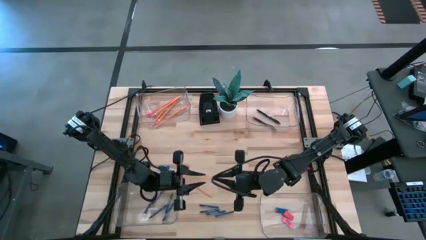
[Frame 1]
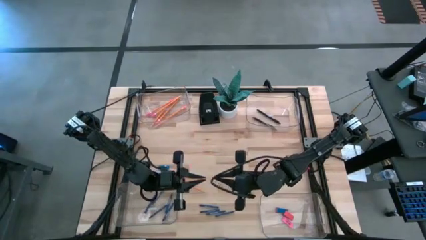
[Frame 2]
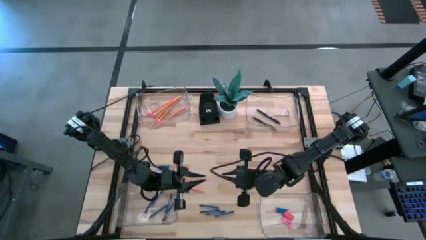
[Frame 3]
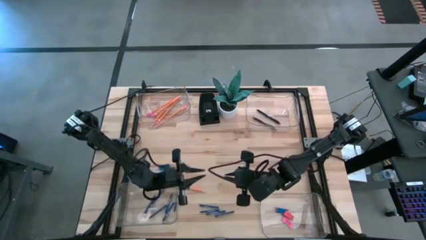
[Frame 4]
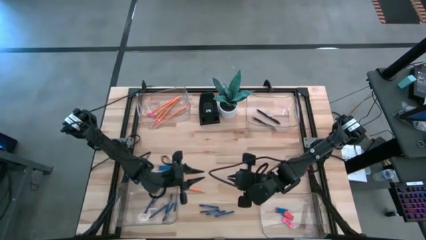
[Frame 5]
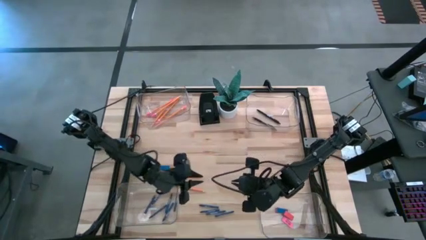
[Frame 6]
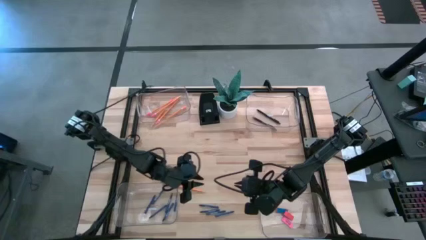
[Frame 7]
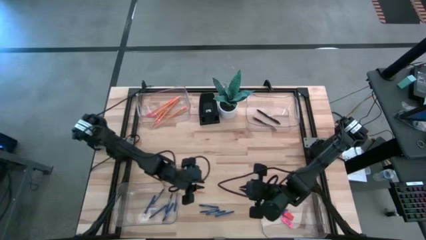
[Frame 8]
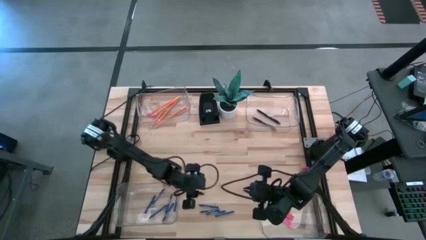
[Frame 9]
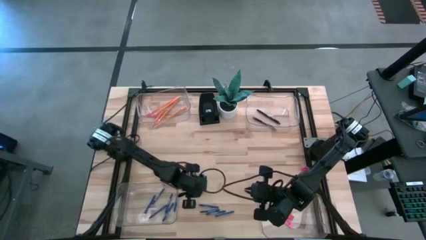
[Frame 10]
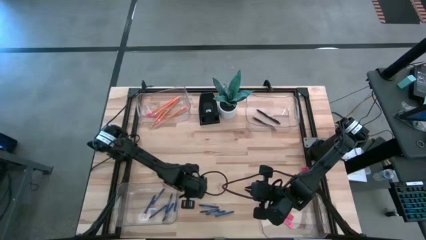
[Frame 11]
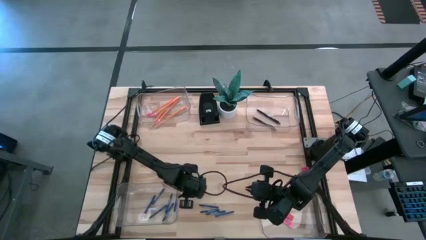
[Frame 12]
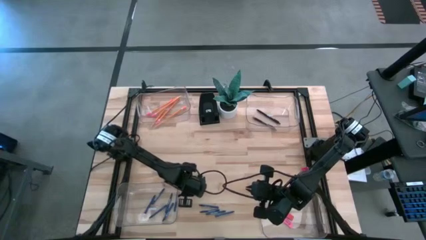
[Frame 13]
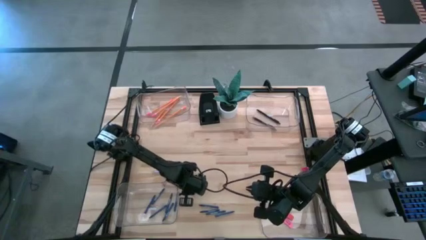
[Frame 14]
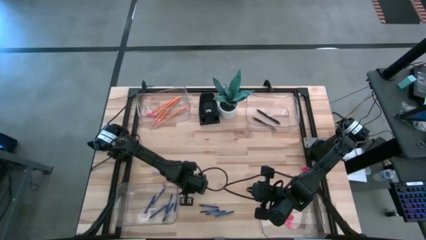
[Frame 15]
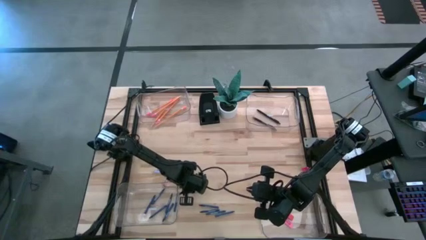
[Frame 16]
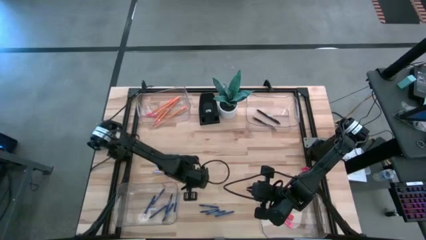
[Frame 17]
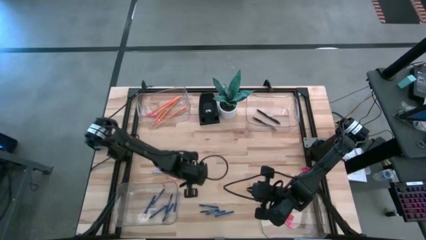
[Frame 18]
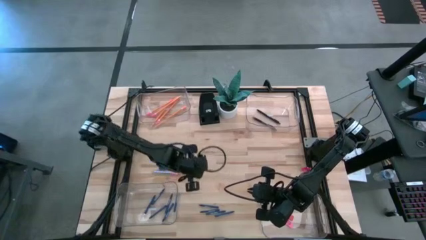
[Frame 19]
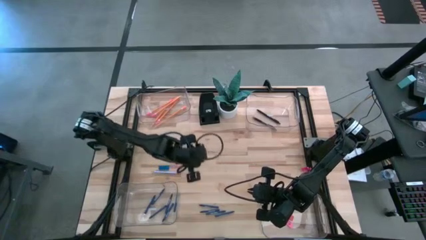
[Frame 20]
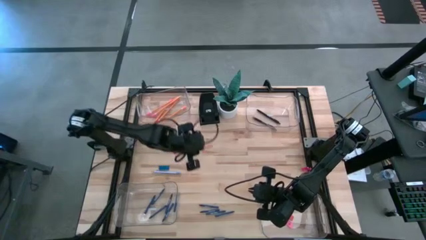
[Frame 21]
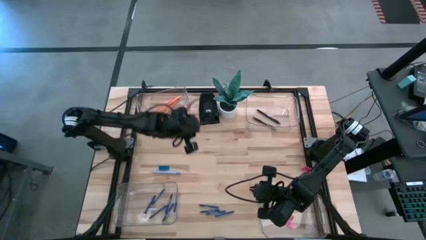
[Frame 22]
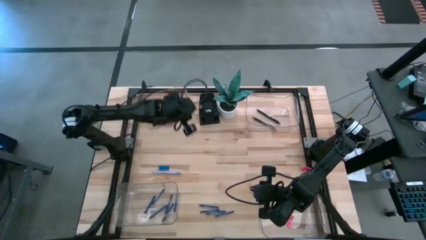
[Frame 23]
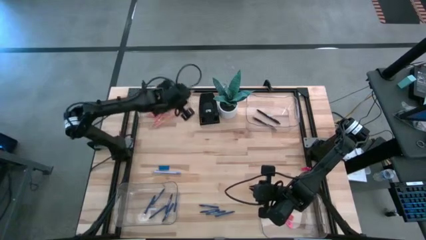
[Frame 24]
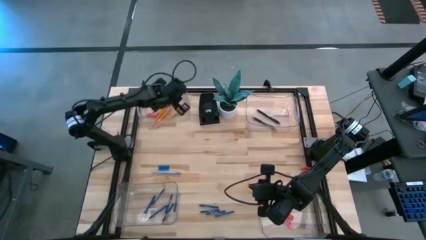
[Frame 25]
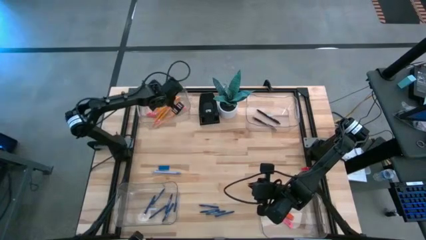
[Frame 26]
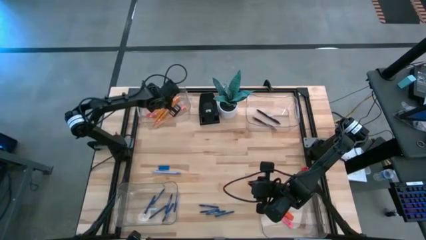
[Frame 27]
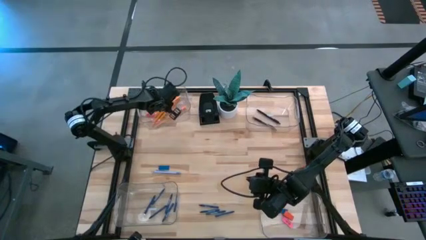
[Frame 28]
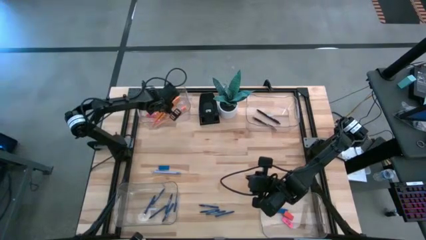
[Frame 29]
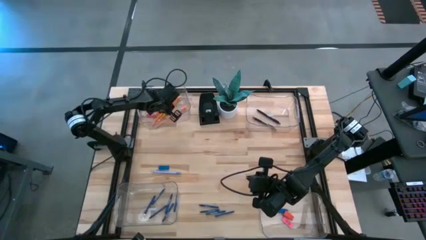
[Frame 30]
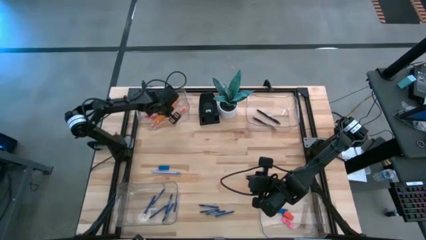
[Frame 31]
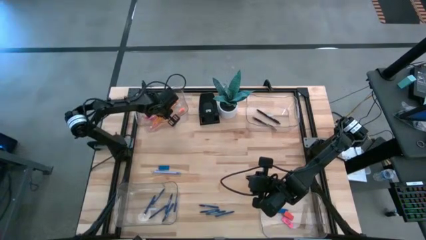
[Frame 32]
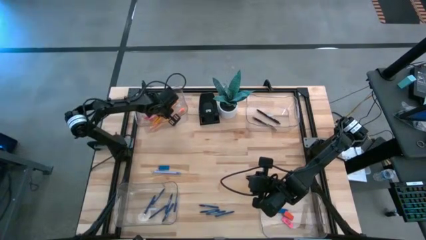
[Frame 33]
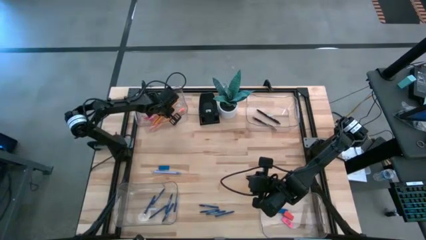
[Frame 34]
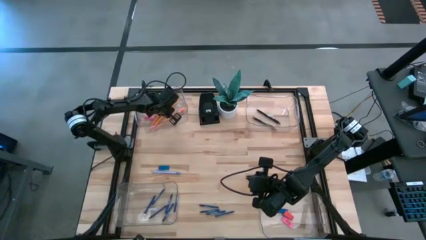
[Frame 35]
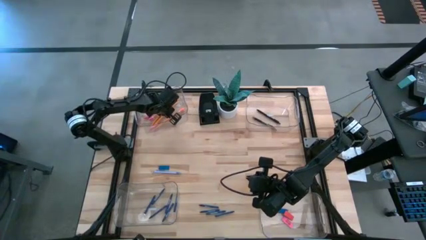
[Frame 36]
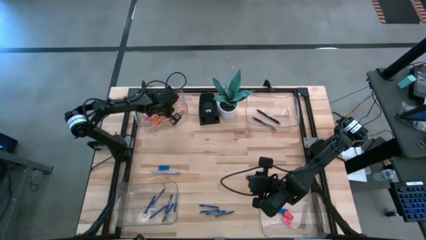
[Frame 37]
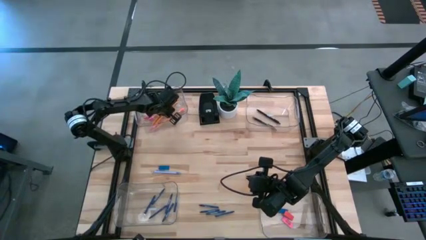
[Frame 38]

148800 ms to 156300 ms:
Task: Sort crayons/erasers/pens/pencils in bins
Put the orange pencil into the top left transparent bin

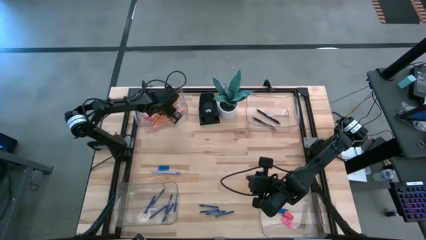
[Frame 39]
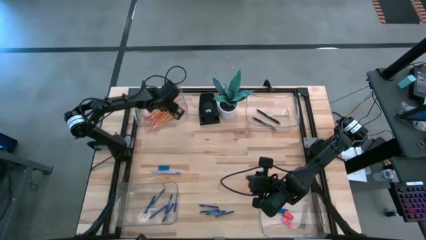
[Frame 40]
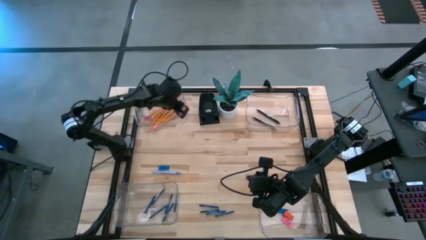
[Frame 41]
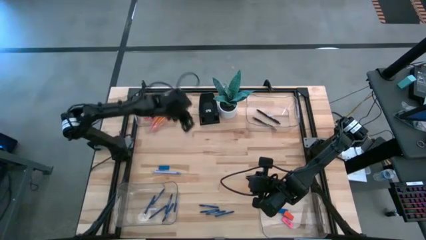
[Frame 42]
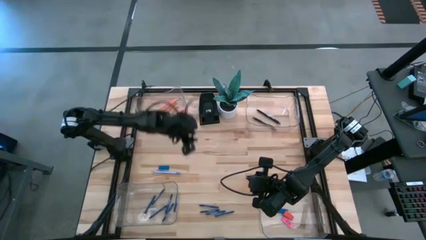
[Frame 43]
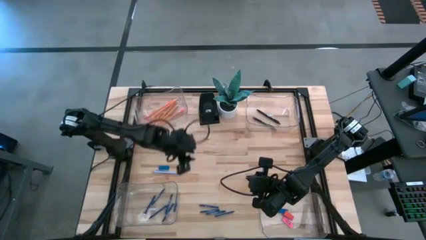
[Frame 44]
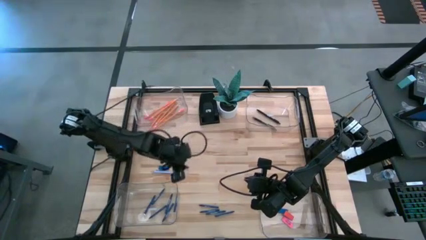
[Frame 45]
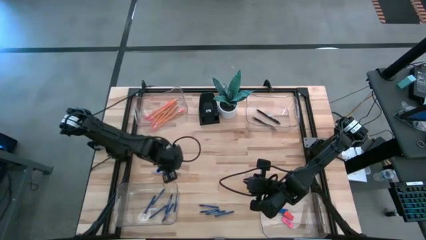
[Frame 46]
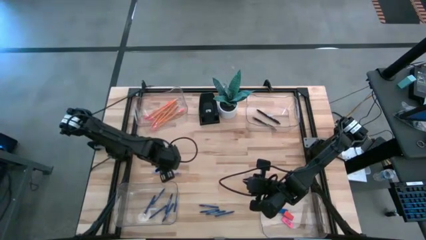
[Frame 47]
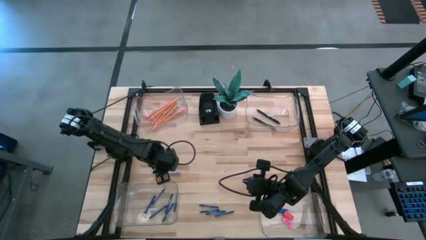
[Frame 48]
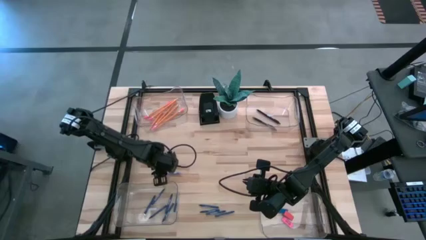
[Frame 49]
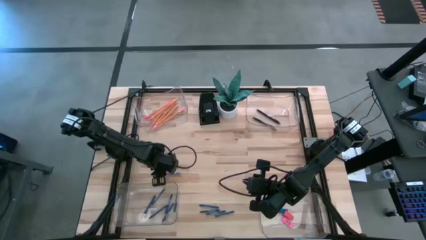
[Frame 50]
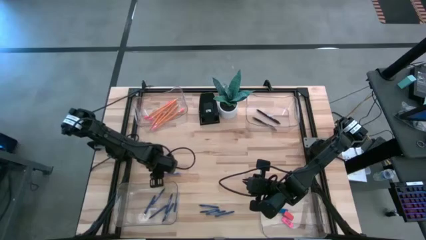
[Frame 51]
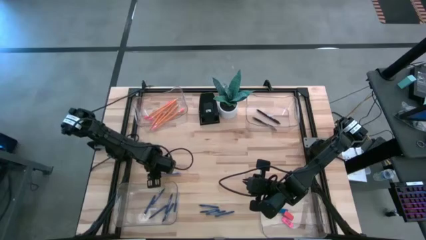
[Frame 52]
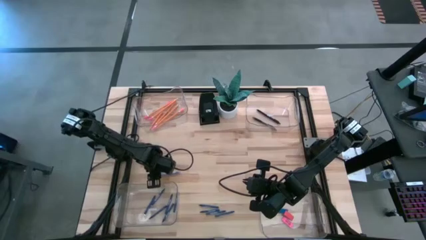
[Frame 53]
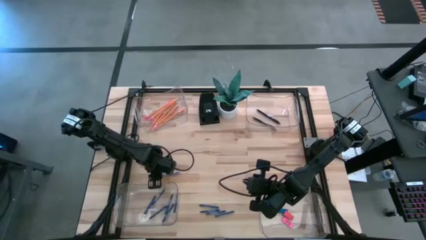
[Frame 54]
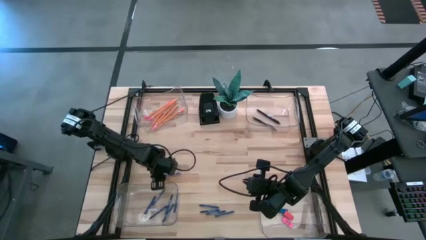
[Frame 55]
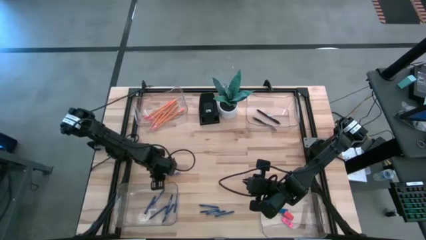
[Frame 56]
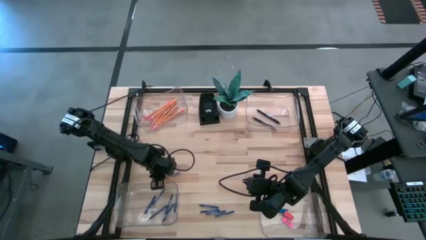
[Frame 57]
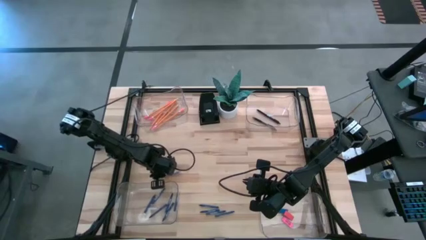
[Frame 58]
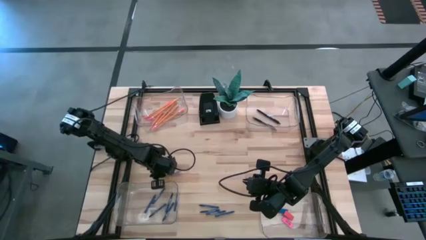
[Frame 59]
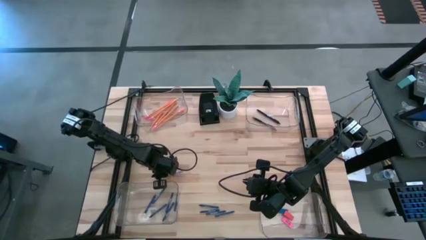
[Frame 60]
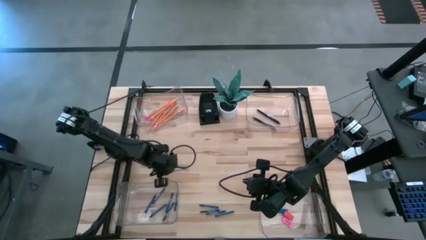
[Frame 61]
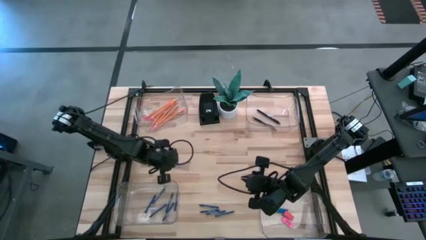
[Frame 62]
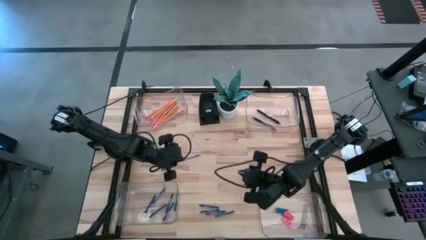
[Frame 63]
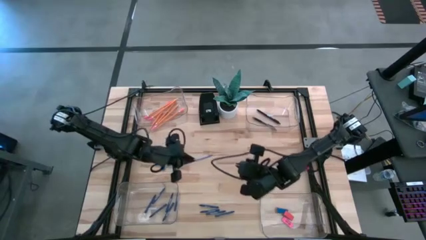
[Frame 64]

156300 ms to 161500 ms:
Put the blue pen into the top right transparent bin

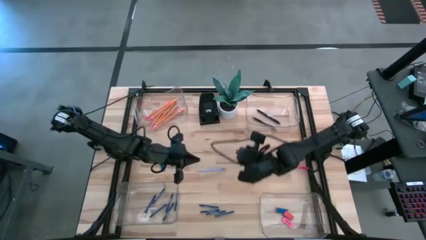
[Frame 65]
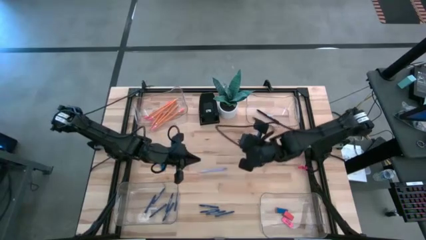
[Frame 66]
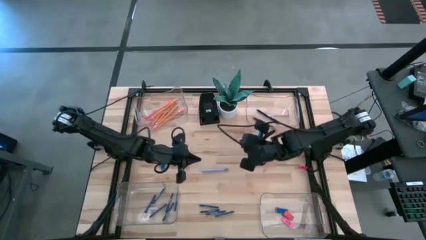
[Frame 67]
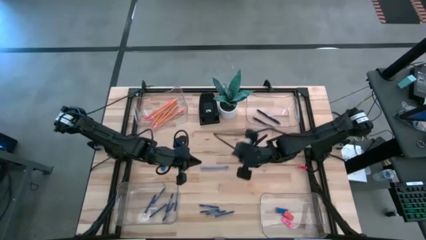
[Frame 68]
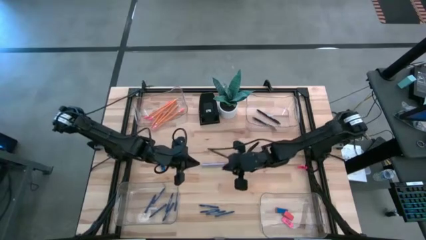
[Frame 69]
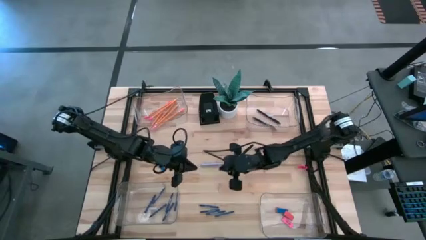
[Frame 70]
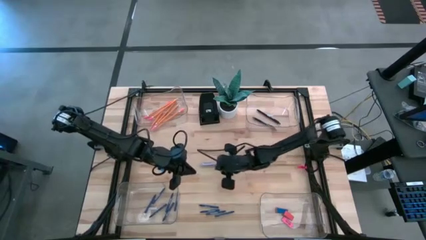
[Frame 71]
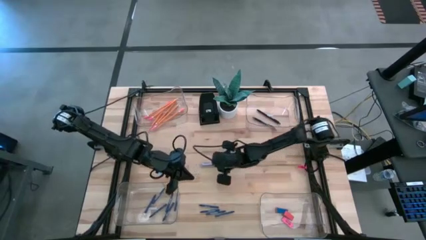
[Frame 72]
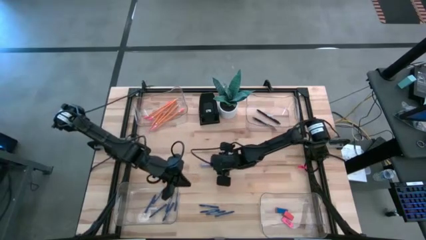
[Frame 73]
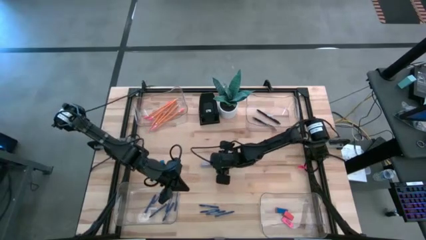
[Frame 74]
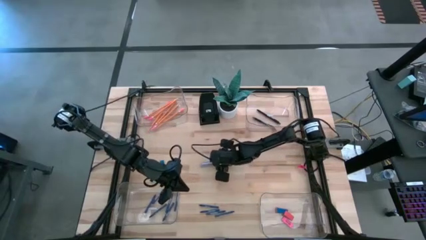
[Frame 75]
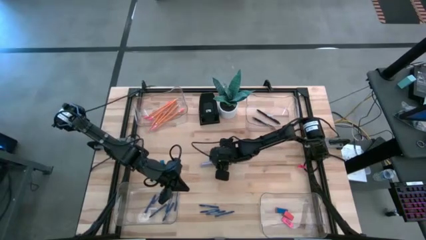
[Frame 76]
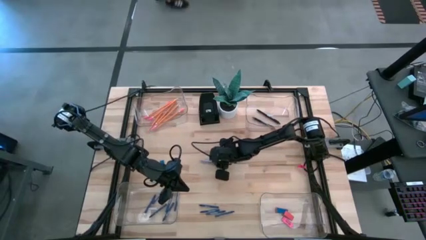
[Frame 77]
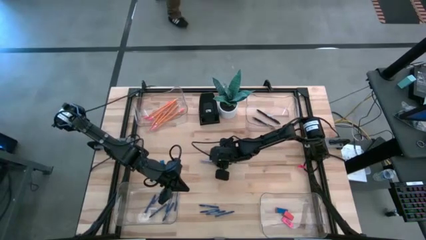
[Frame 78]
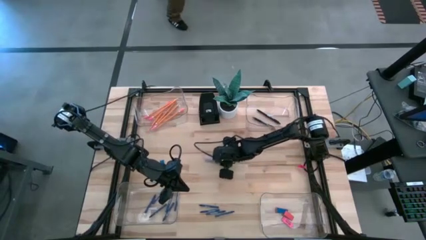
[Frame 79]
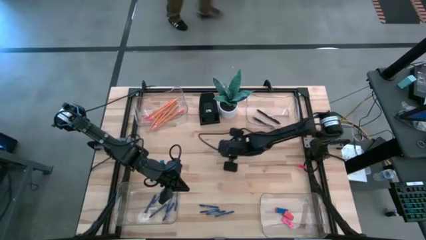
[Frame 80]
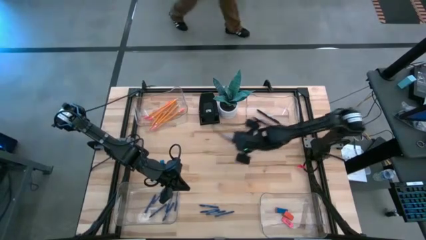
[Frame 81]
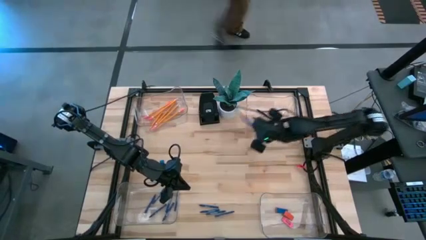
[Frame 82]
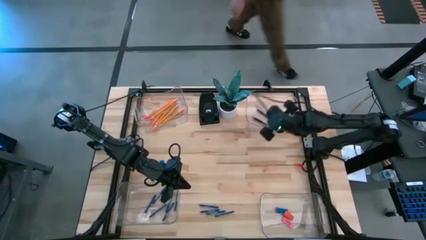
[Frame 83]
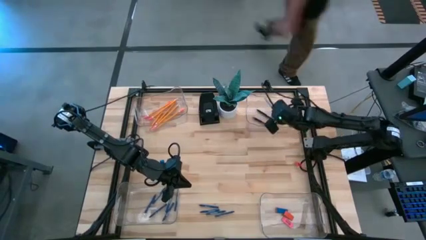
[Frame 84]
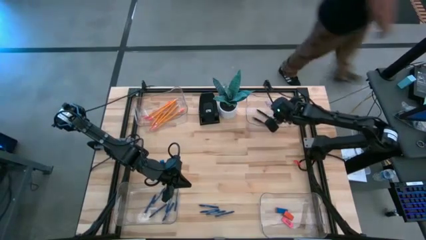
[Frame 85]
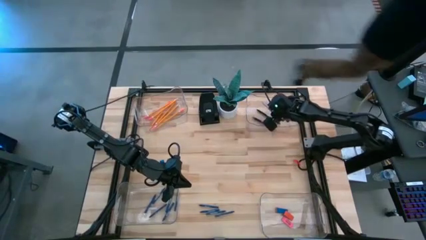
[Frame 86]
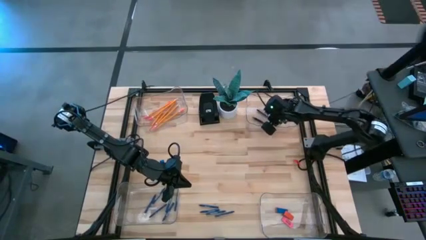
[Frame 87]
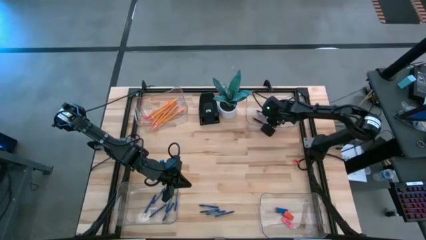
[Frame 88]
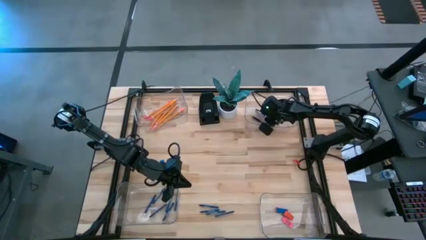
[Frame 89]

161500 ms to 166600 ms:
Put the blue pen into the top right transparent bin
